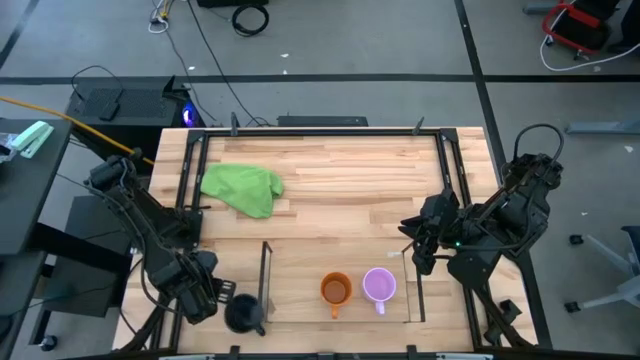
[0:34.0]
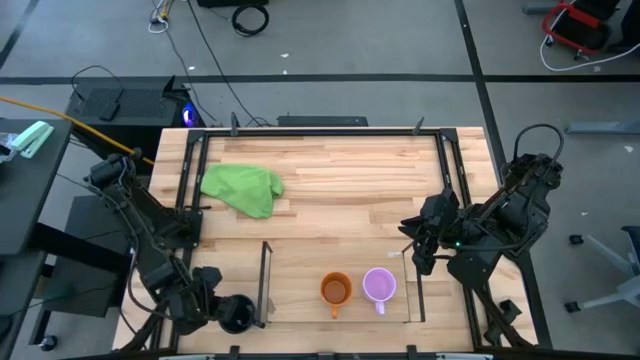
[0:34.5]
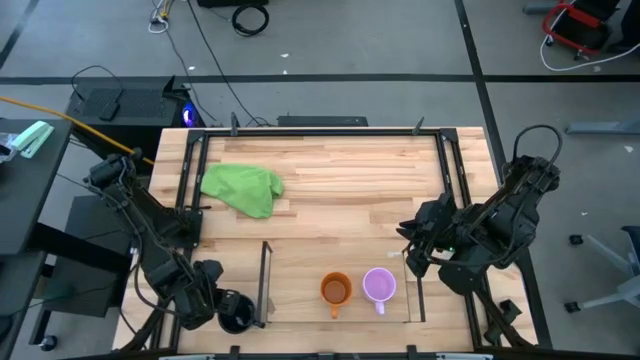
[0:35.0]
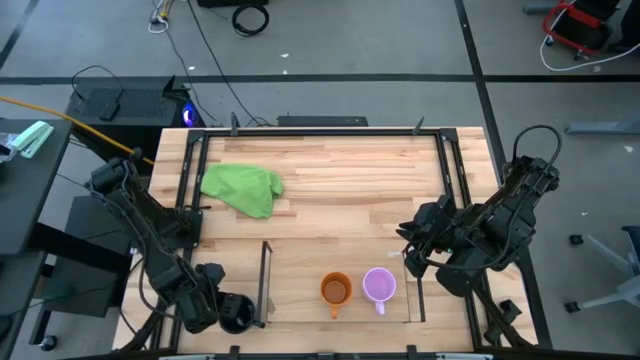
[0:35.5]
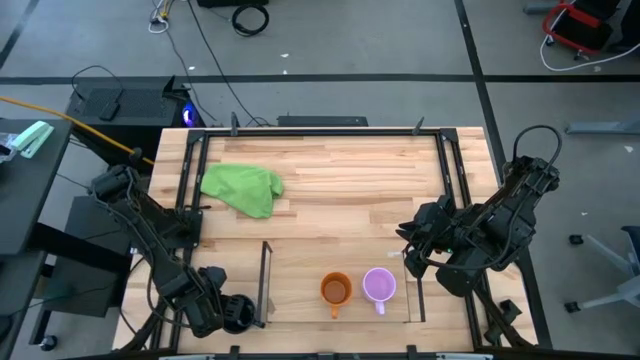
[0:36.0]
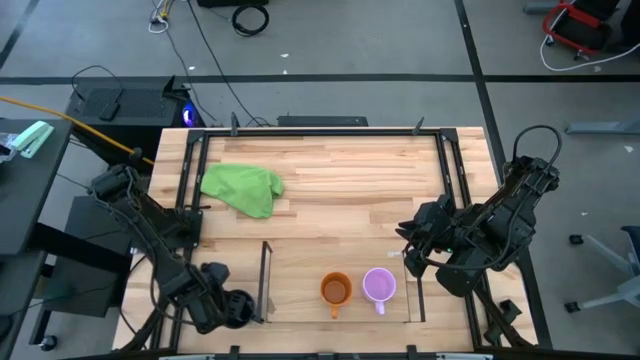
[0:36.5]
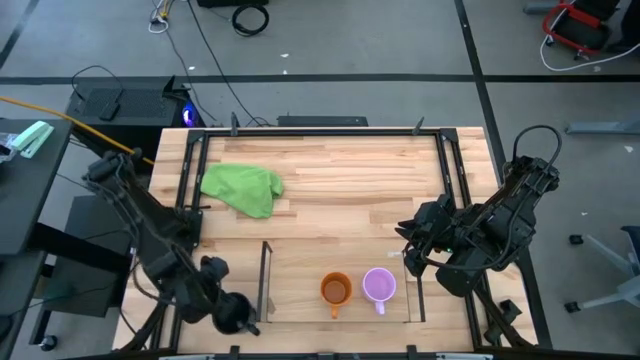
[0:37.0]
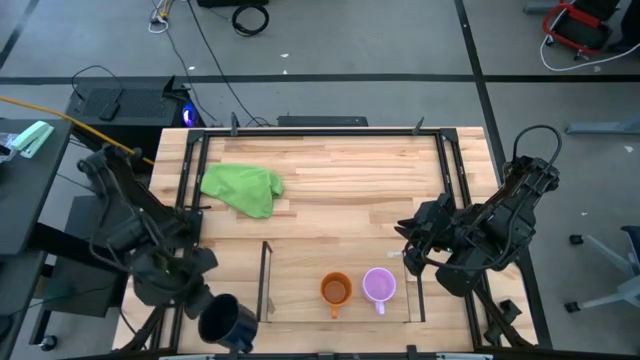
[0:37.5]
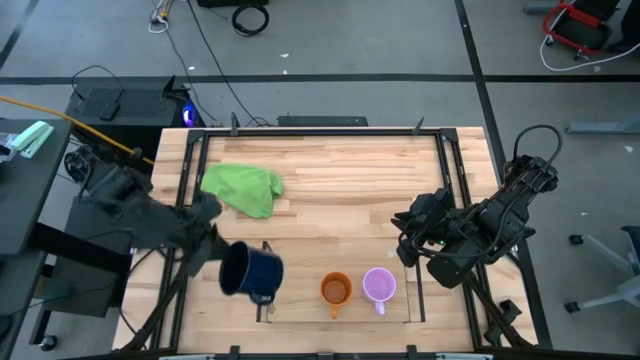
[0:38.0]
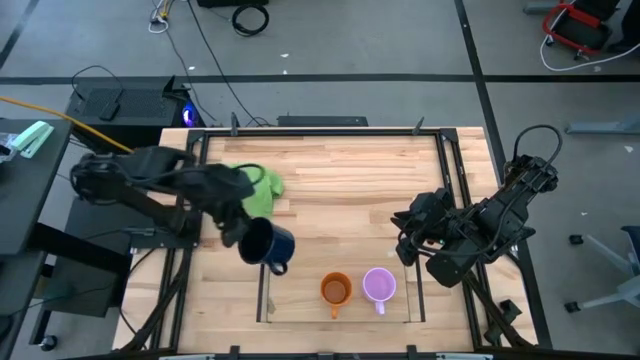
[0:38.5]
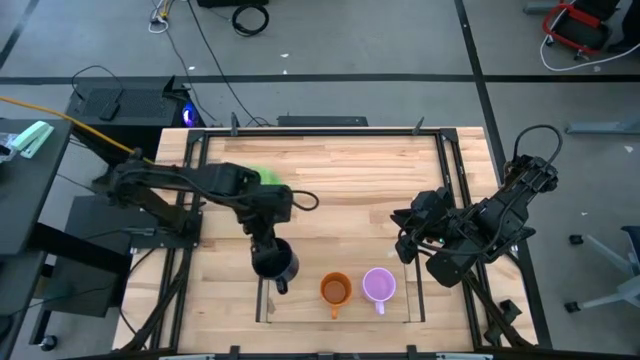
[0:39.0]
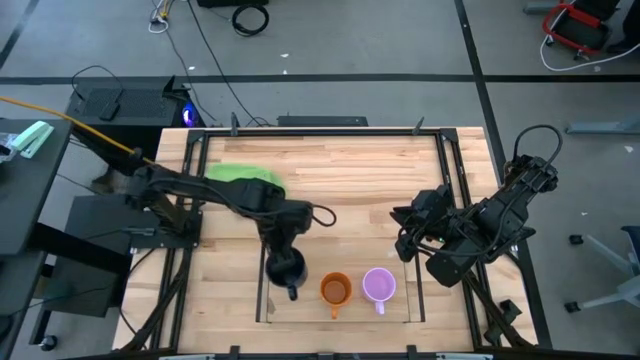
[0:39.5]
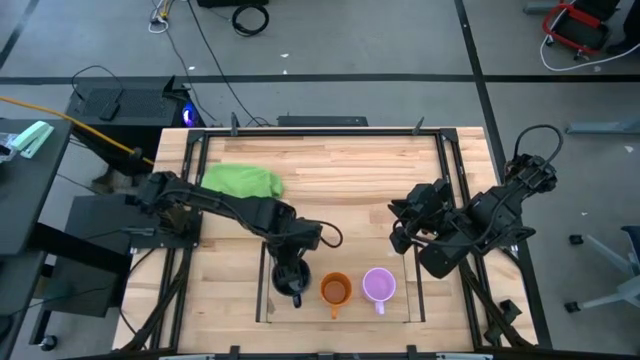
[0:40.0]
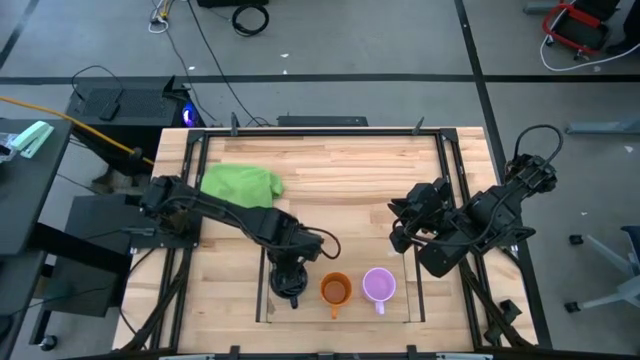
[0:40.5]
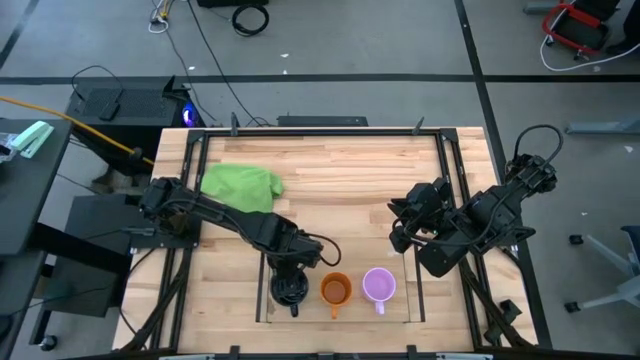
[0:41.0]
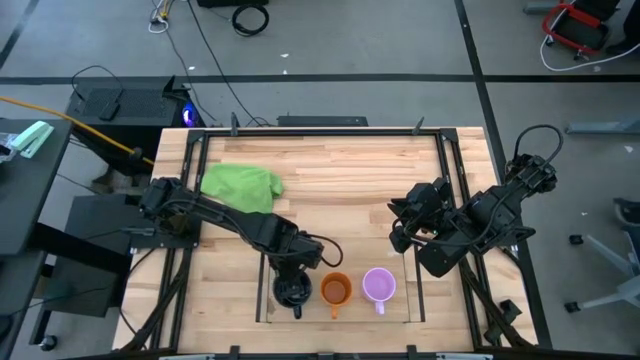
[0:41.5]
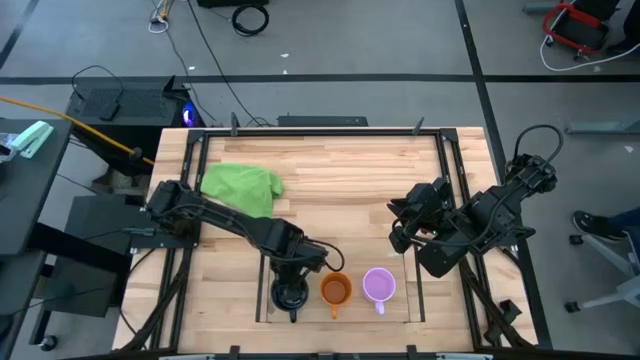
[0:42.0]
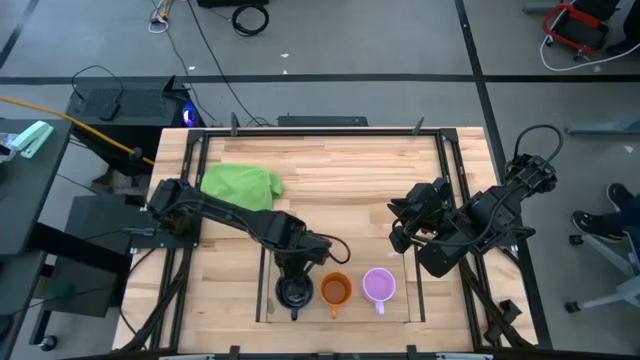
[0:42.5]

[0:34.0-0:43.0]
Task: Stack small to large cups/mugs on shelf
Put the black cup on the shelf

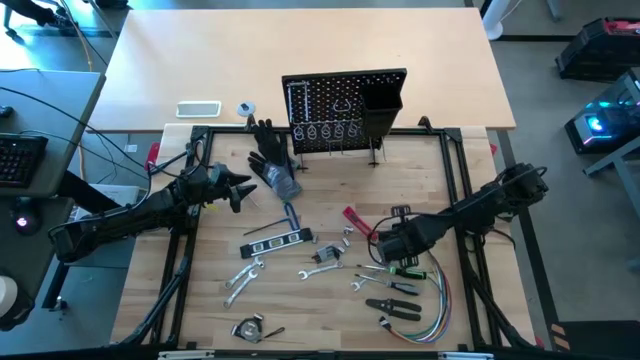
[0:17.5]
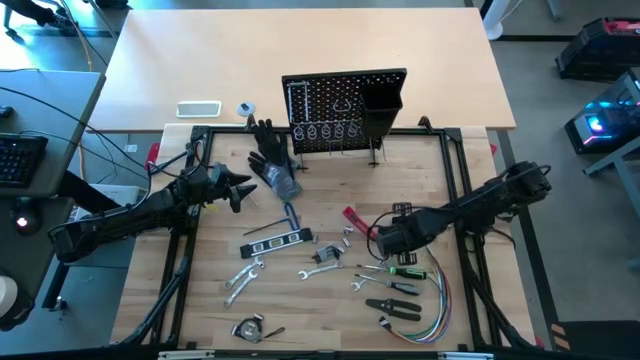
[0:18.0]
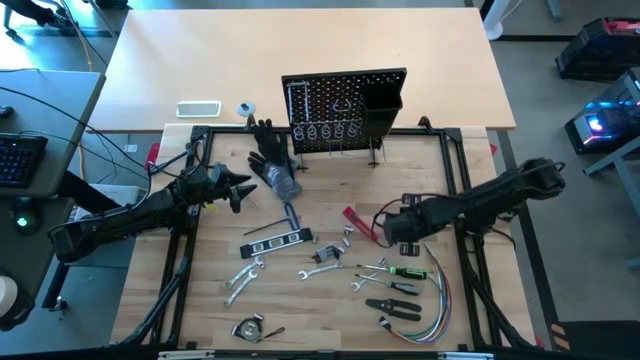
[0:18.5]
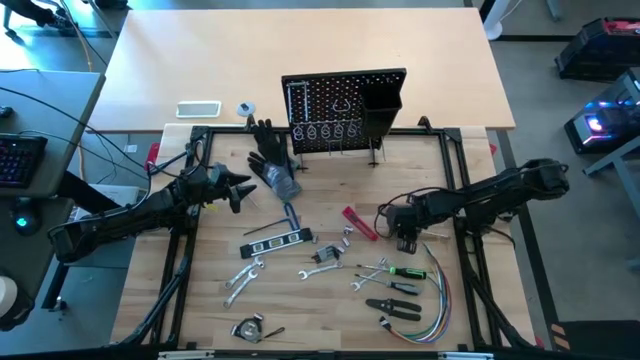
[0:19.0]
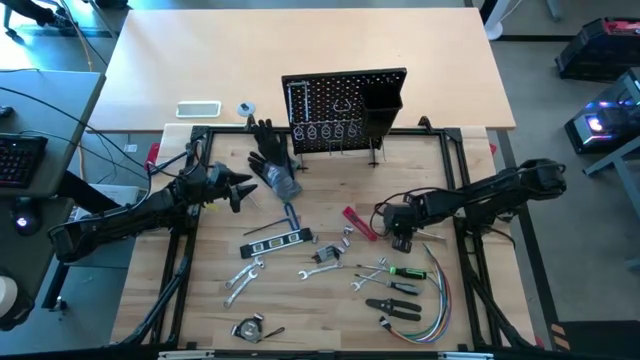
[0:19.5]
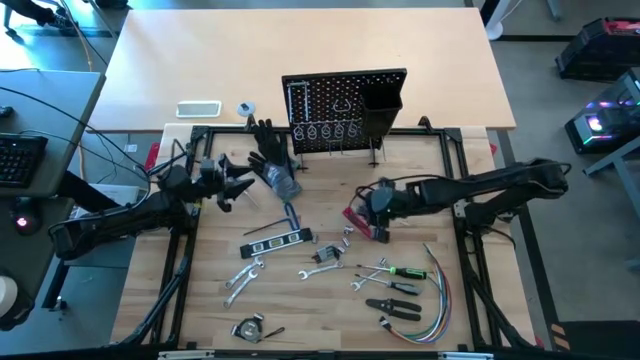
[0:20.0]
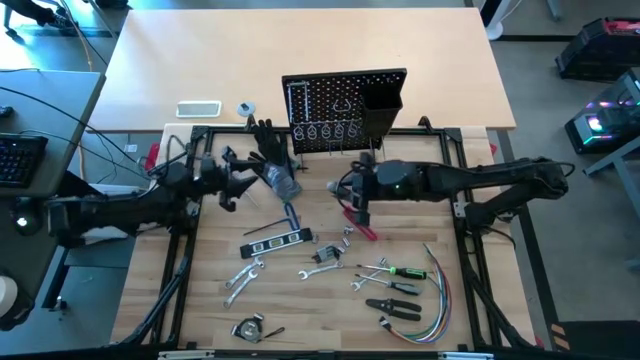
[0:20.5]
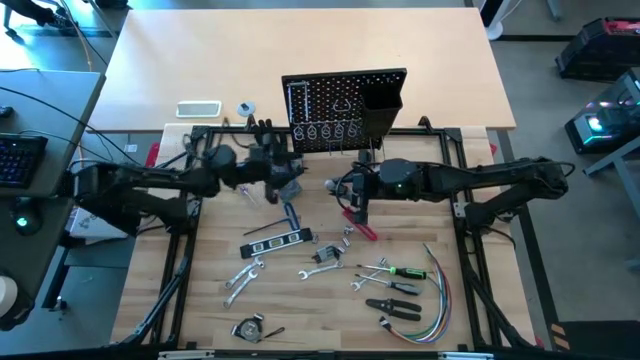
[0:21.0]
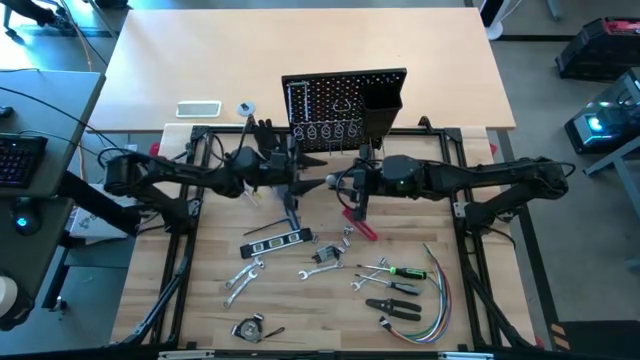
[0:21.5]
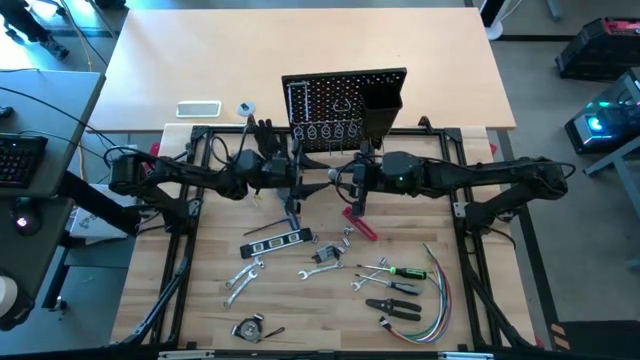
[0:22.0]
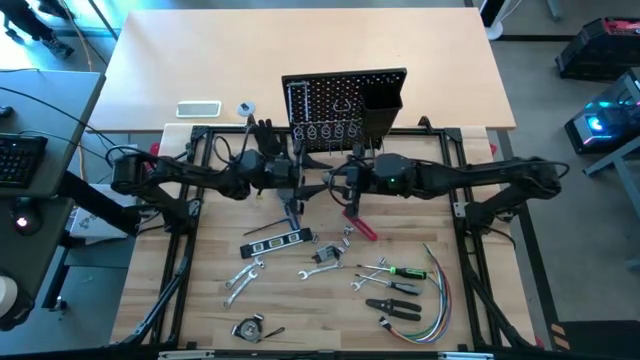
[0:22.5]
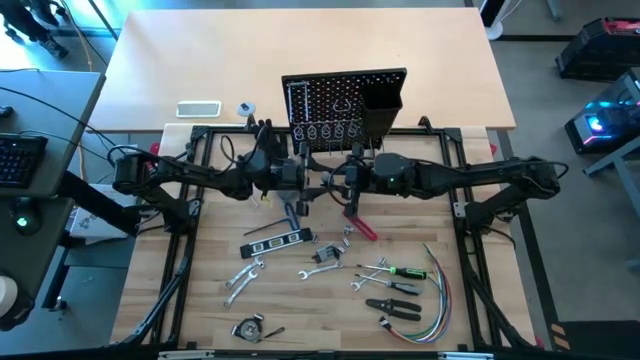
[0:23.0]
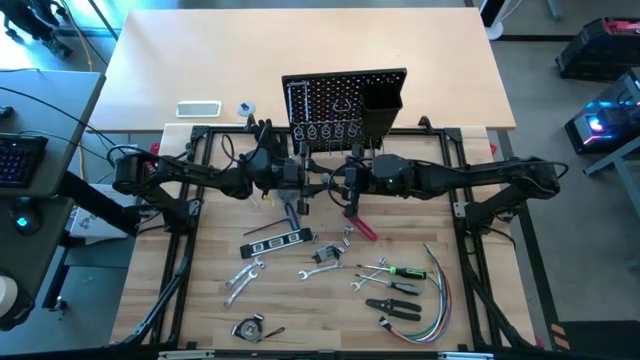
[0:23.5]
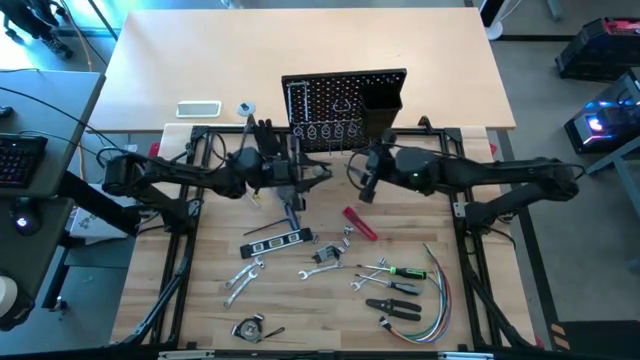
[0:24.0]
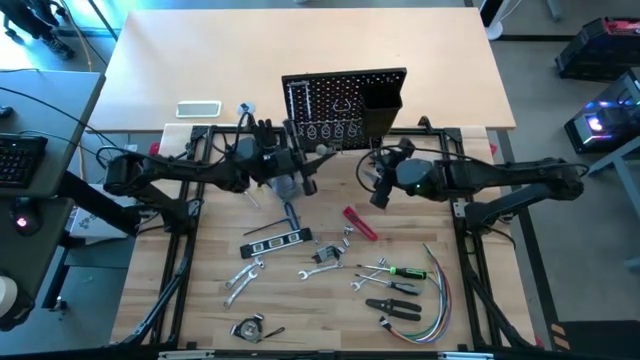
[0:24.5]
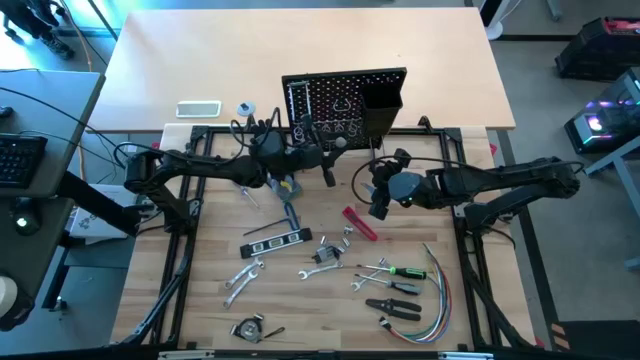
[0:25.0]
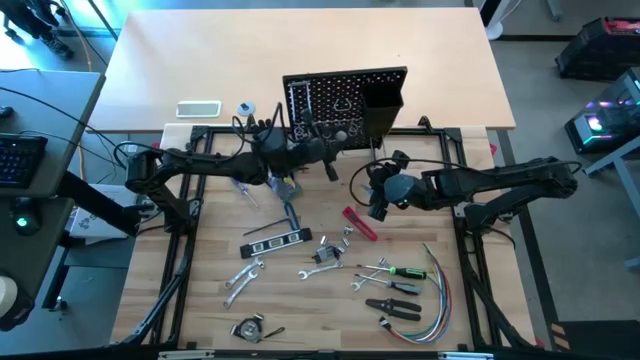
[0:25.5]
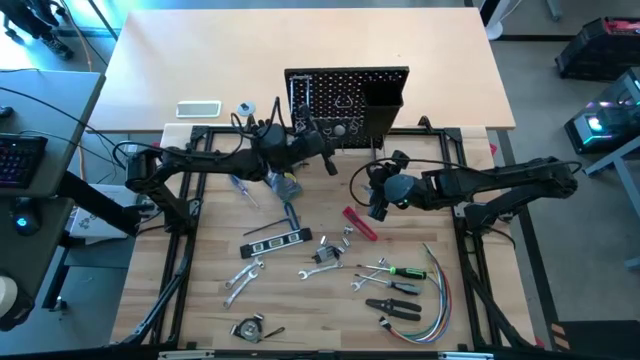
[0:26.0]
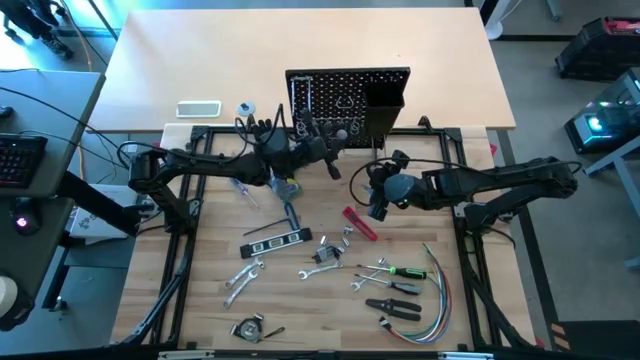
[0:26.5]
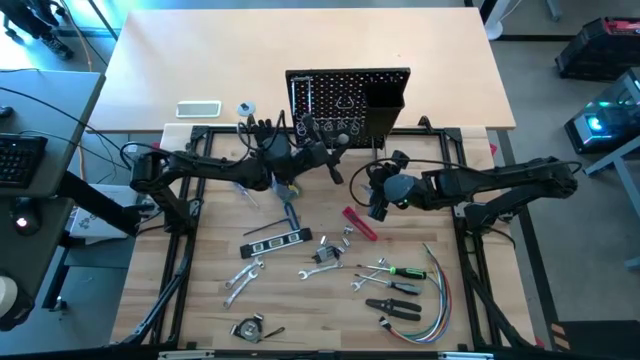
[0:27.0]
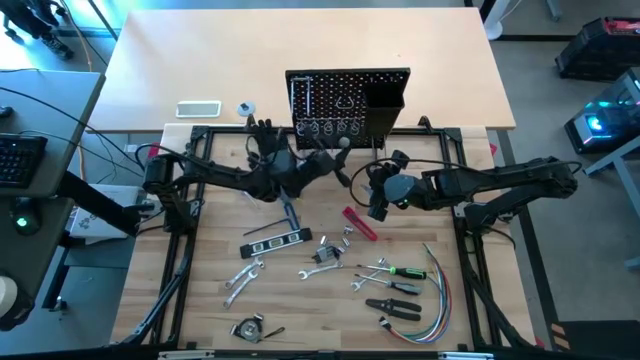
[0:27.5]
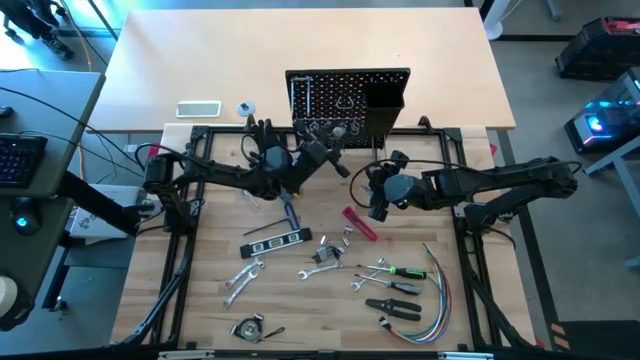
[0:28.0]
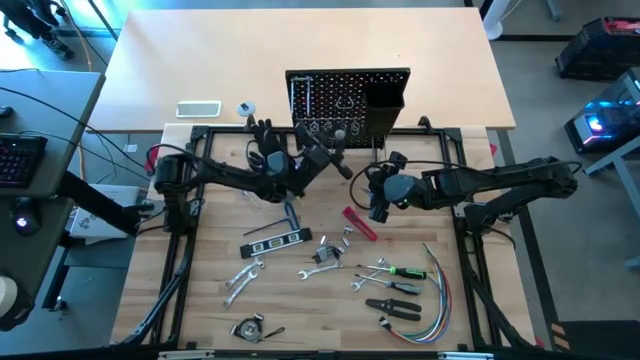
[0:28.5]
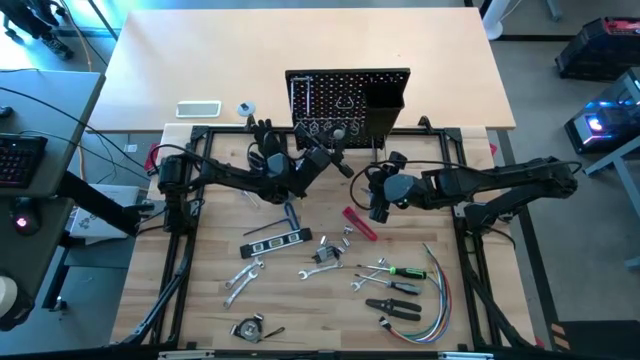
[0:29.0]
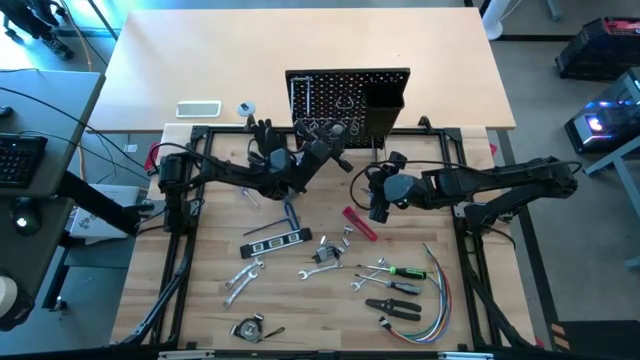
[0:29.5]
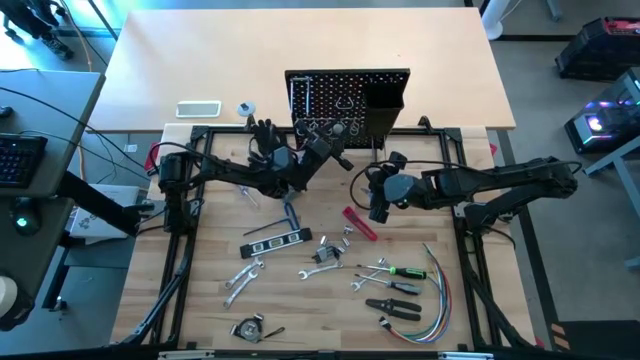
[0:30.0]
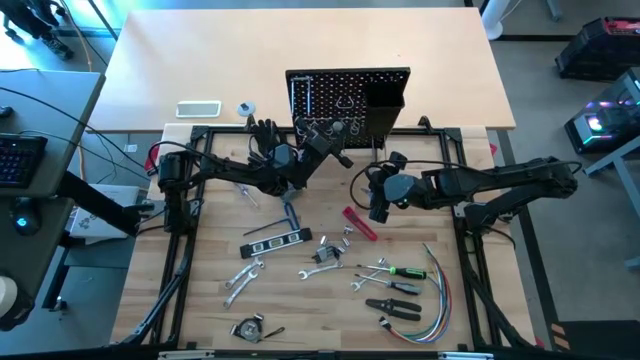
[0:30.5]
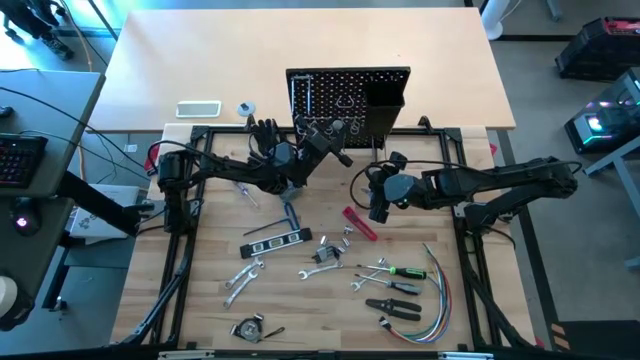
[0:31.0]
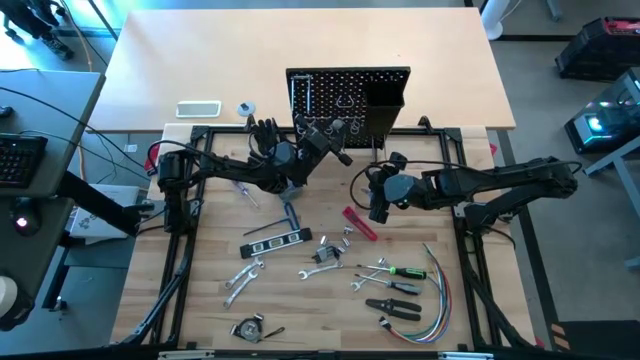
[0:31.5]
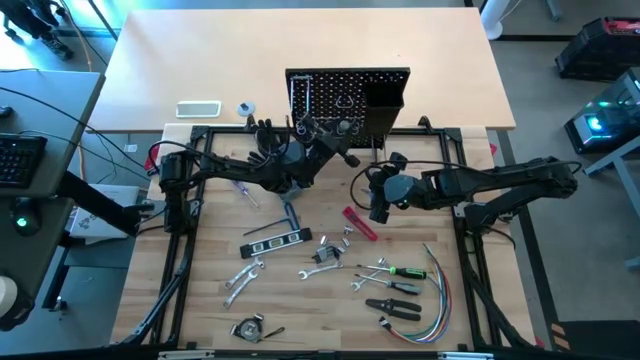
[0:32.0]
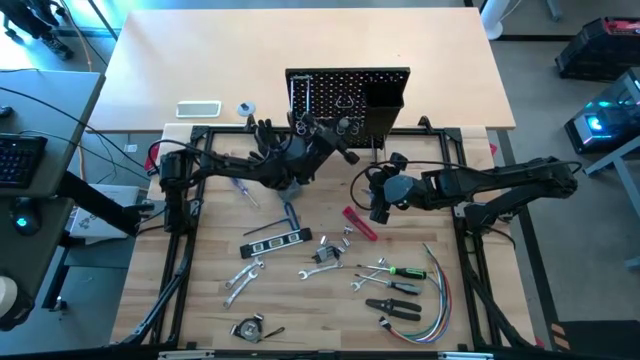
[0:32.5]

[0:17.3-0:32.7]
Task: Hang tools onto peg board
Hang the top gray screwdriver on the pegboard
